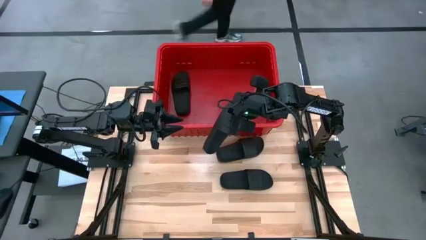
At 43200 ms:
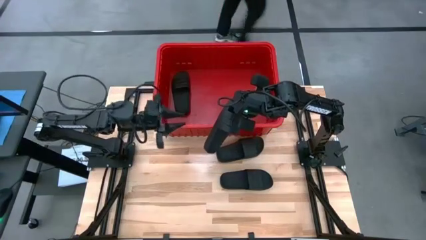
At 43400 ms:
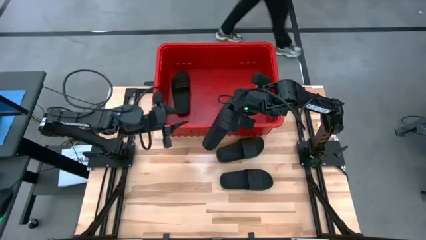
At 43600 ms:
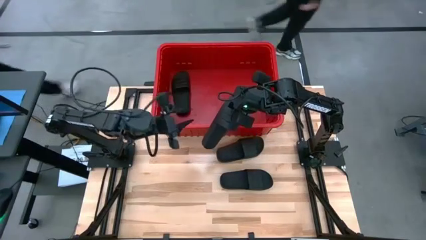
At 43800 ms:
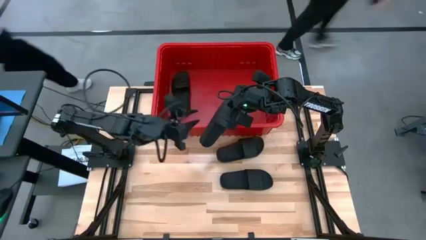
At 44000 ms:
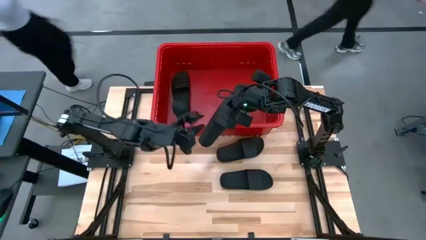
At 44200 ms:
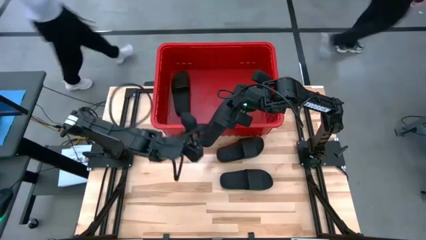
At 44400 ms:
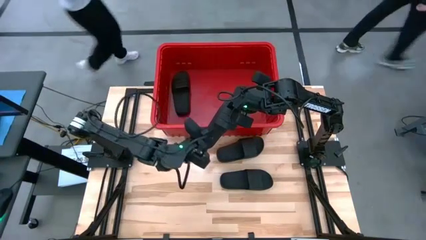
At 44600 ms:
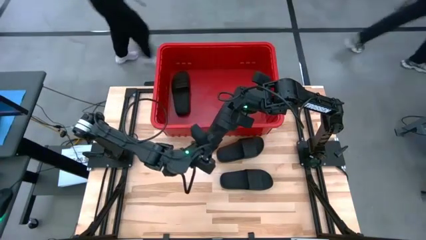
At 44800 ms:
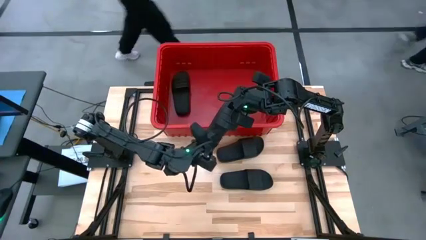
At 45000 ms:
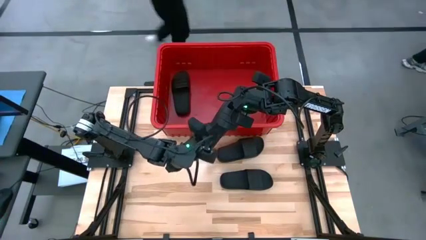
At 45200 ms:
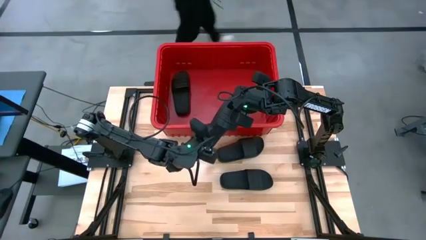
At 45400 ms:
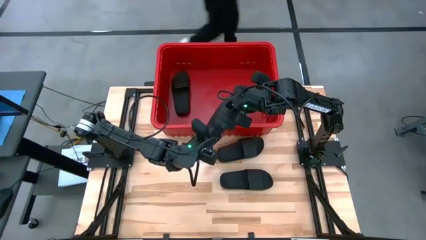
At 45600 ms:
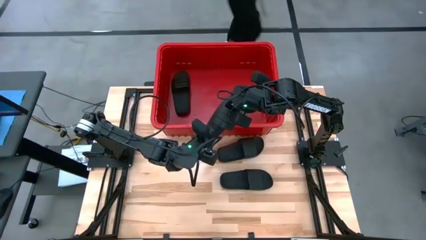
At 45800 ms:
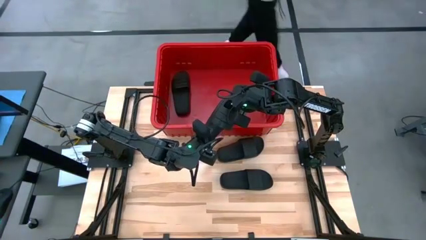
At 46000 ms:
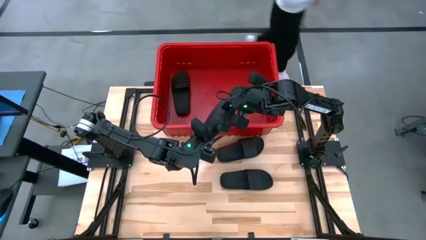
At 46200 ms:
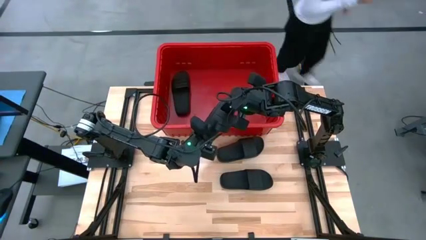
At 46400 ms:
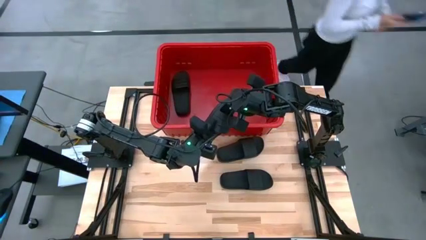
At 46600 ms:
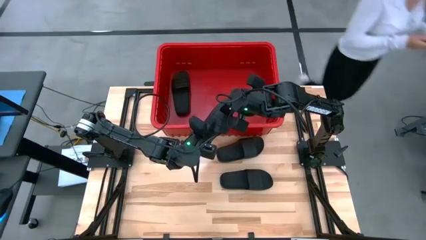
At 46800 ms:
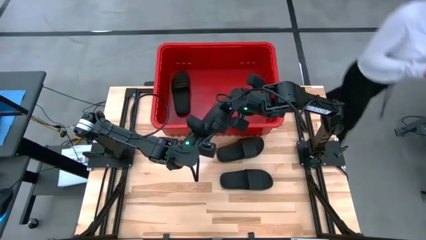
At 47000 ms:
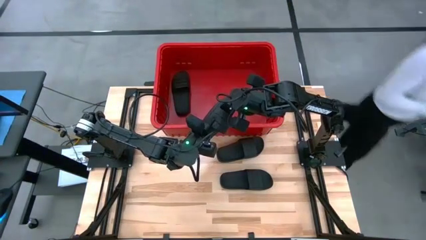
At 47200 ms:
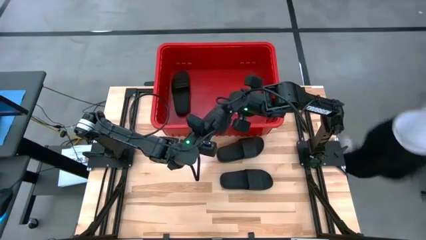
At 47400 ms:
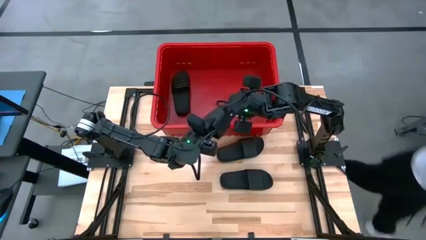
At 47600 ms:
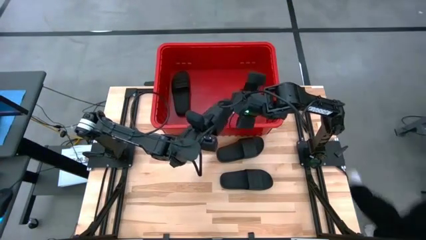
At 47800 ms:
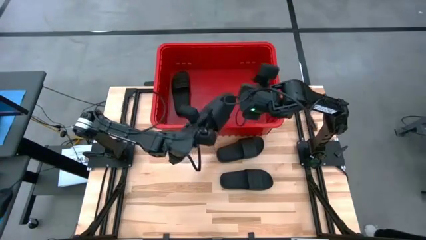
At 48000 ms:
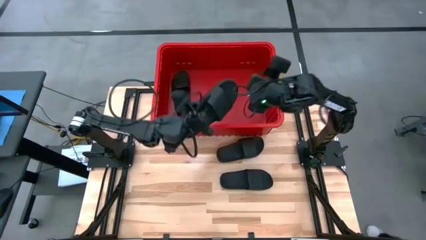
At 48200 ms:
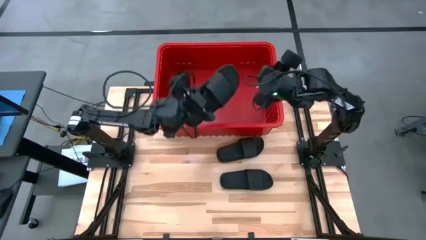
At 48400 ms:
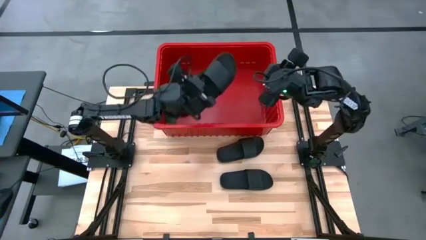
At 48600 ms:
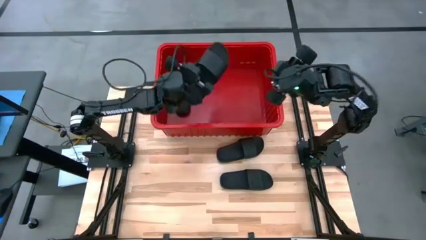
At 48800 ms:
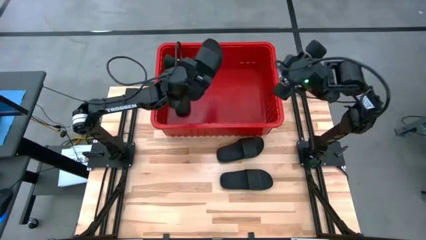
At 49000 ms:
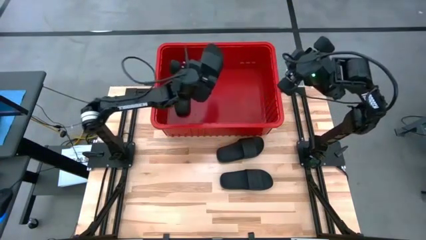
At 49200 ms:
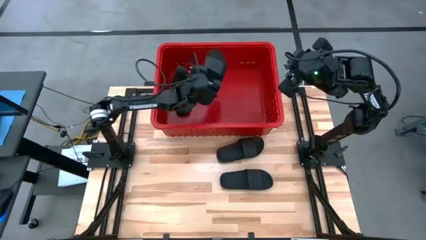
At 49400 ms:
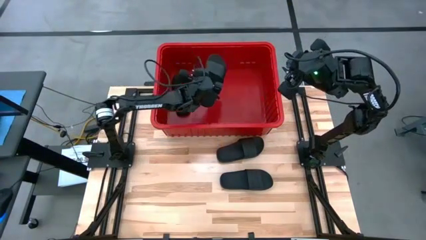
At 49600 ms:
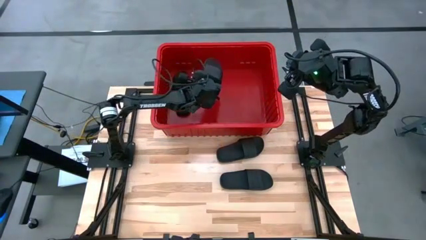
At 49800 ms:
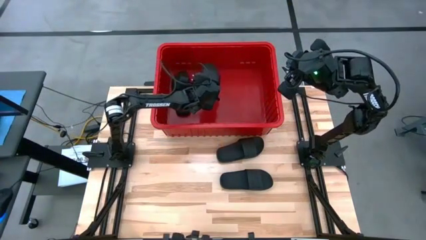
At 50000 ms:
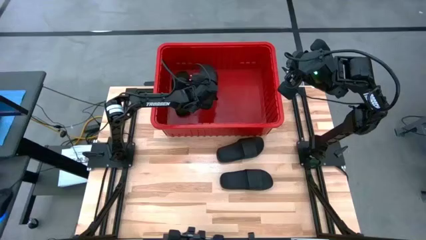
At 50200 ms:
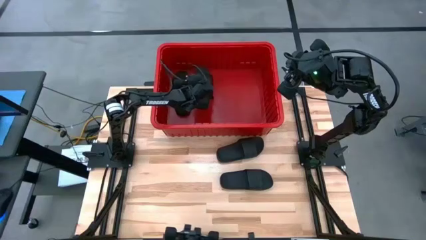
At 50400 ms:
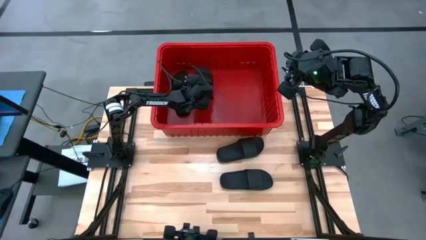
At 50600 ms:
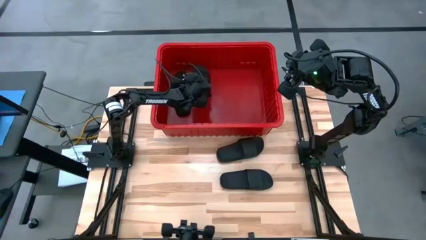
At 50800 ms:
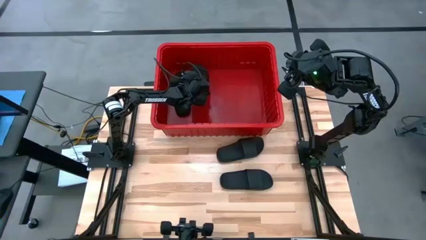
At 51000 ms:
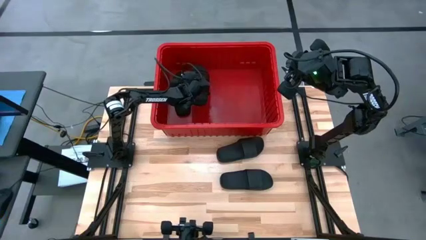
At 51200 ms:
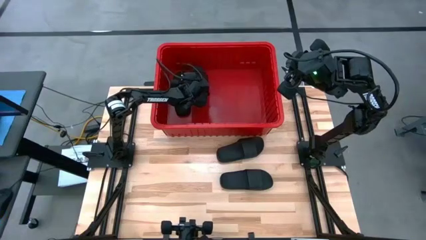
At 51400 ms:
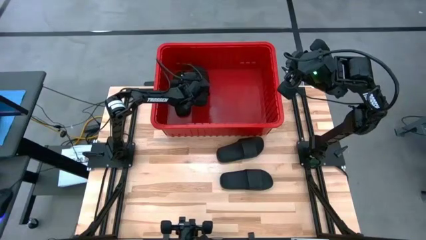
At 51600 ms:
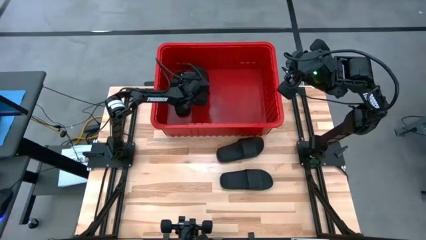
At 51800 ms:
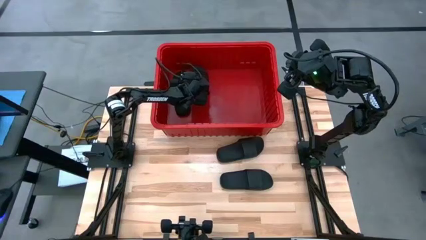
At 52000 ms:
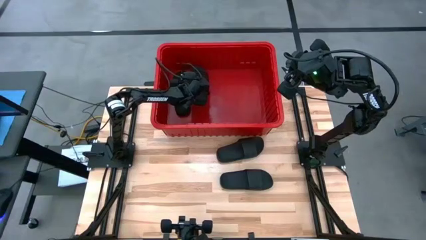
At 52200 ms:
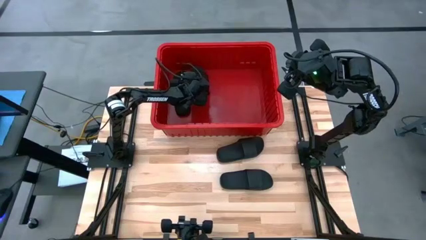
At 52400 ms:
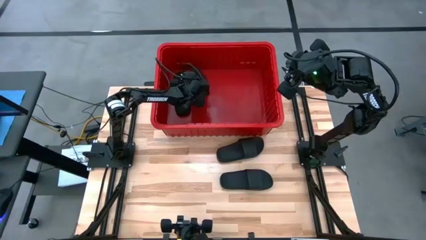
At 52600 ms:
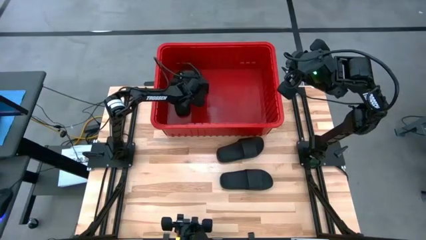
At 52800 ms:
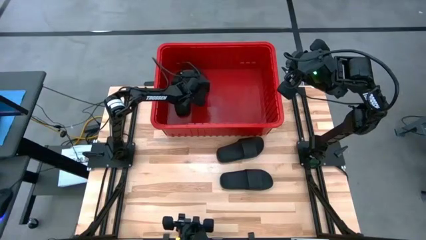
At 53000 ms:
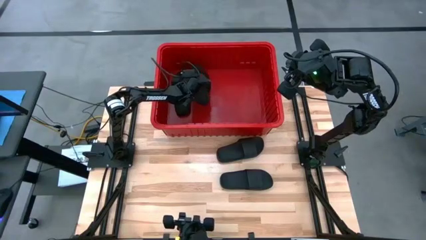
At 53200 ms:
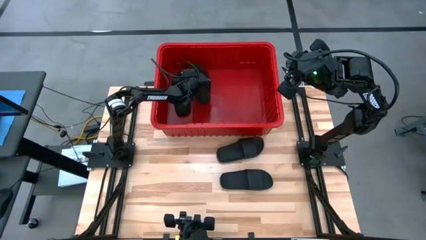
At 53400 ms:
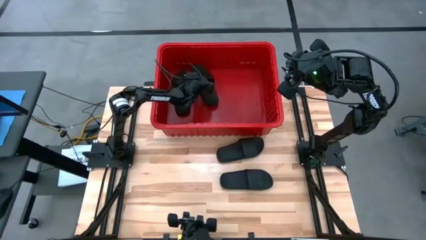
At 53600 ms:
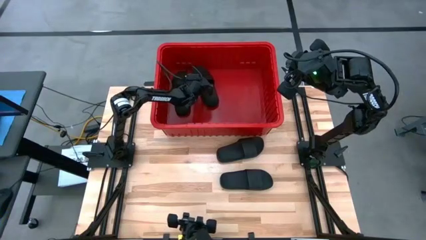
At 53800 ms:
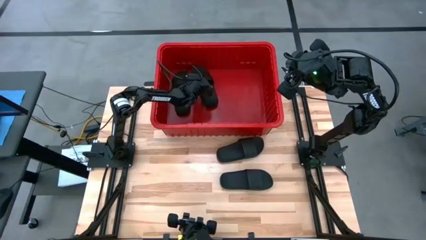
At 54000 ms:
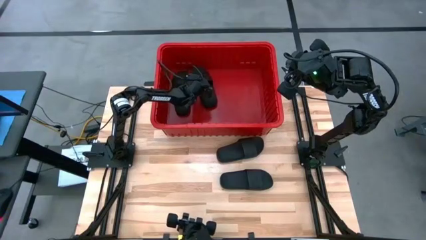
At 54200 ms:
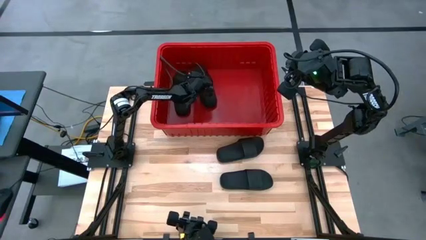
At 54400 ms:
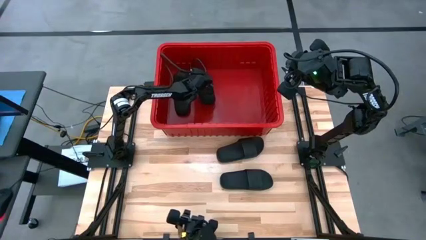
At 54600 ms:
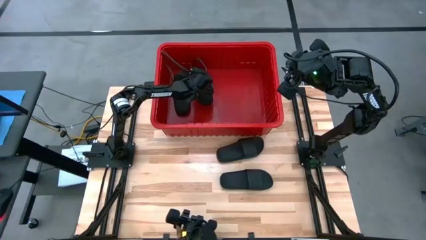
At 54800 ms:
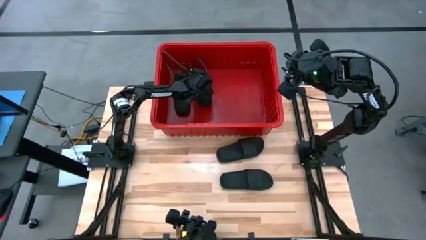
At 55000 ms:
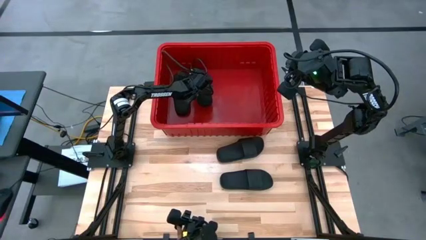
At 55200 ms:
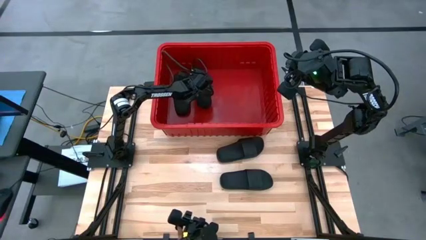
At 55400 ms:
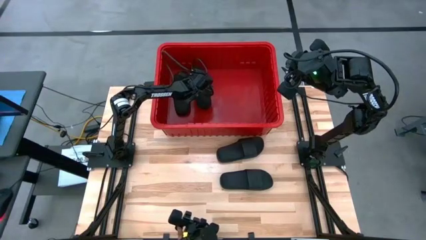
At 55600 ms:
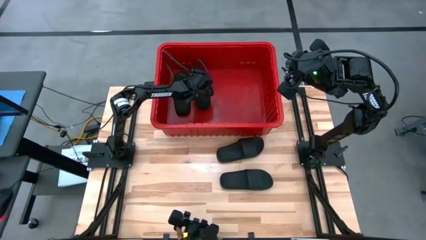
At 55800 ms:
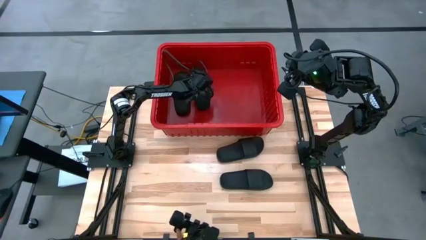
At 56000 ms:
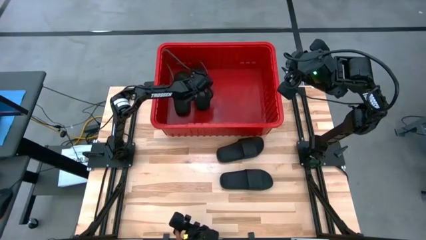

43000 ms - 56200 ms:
Task: Pick and place slides into bin
Put the black slide into the red bin
